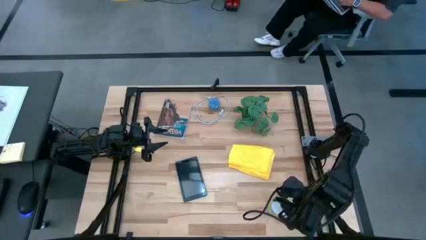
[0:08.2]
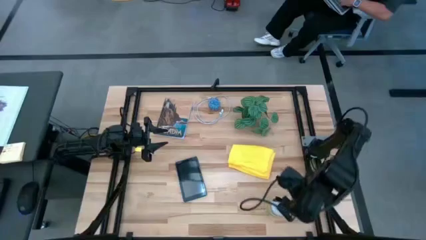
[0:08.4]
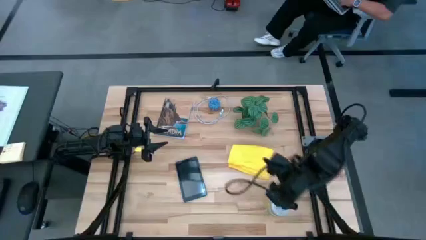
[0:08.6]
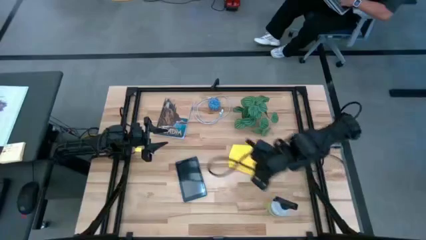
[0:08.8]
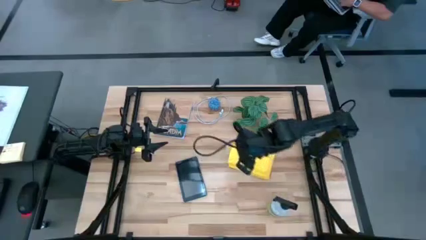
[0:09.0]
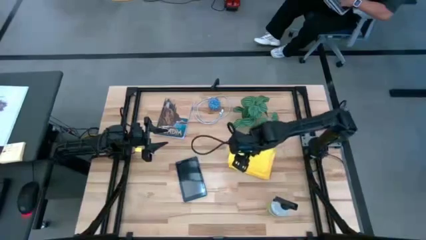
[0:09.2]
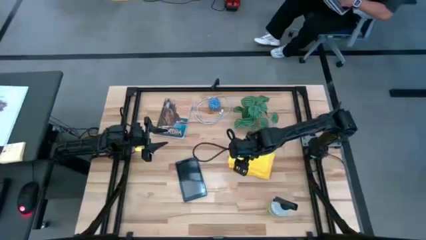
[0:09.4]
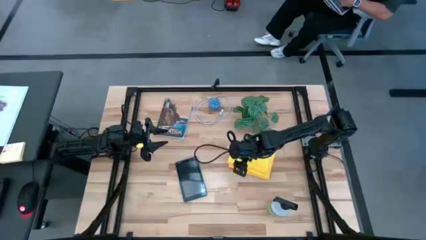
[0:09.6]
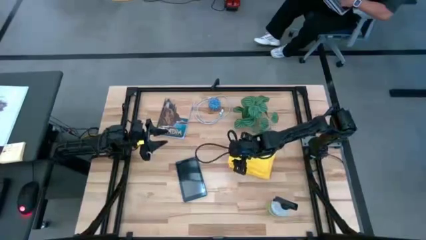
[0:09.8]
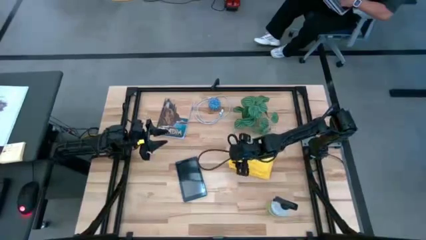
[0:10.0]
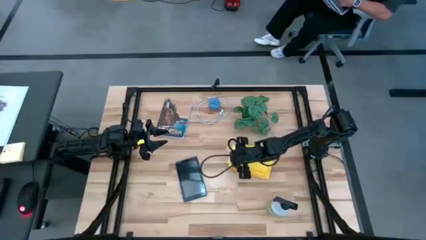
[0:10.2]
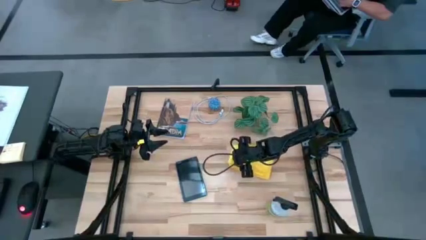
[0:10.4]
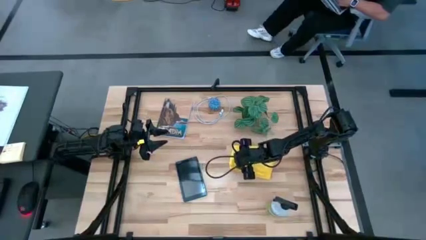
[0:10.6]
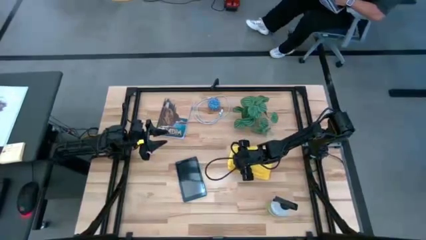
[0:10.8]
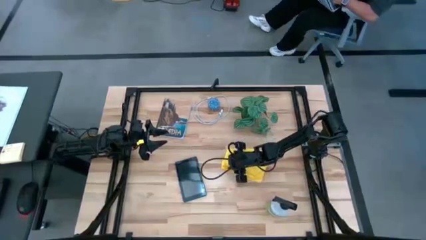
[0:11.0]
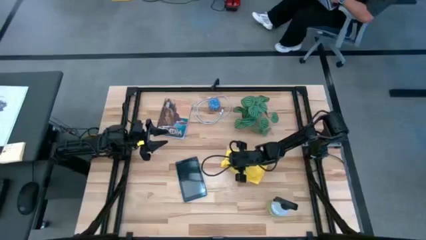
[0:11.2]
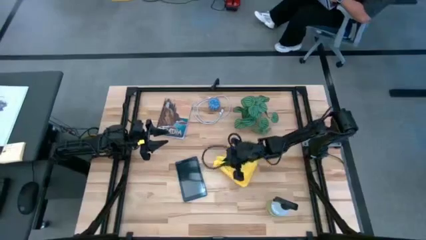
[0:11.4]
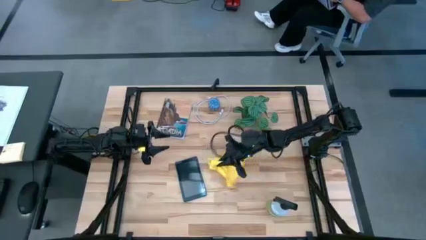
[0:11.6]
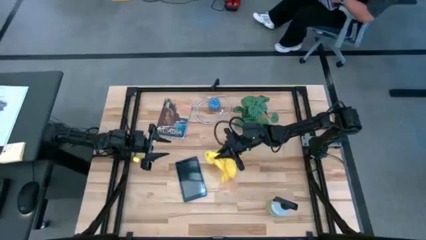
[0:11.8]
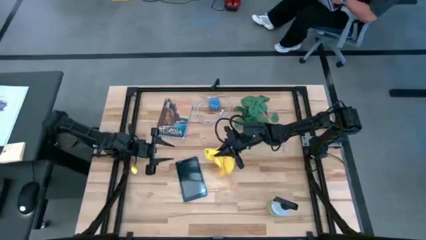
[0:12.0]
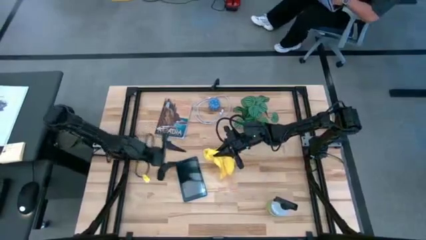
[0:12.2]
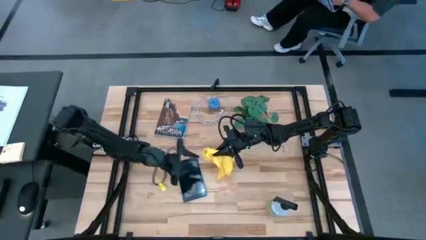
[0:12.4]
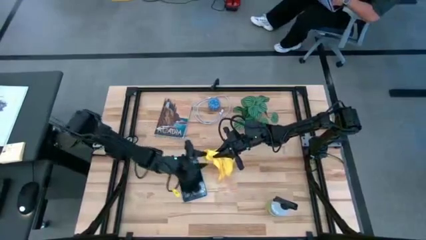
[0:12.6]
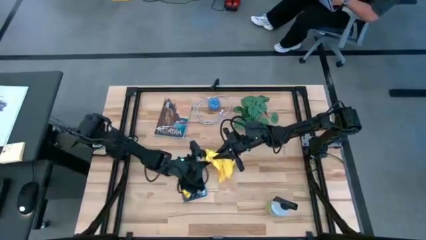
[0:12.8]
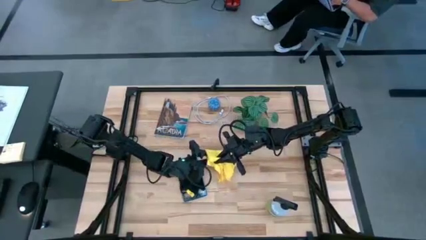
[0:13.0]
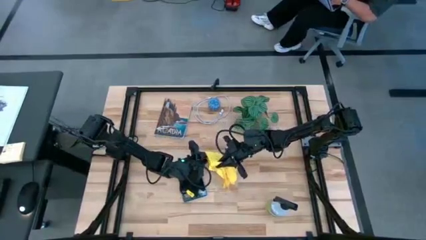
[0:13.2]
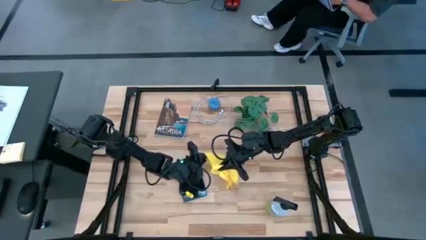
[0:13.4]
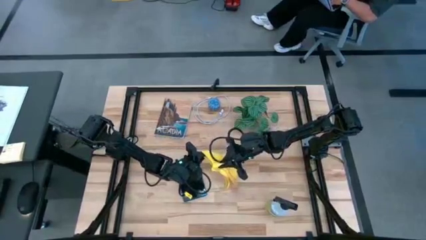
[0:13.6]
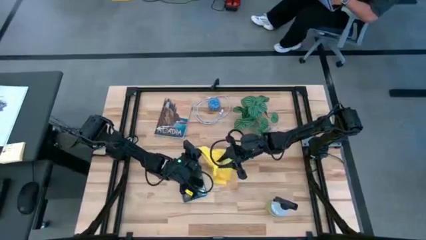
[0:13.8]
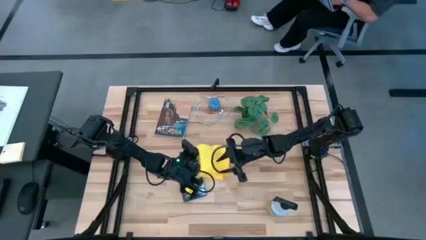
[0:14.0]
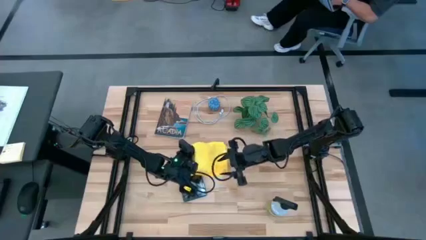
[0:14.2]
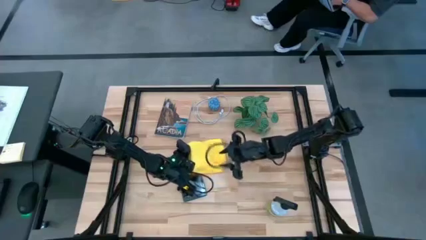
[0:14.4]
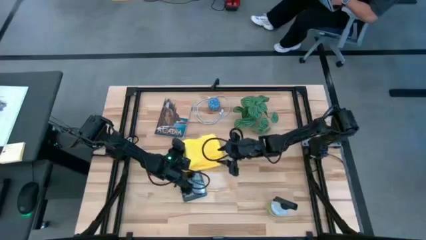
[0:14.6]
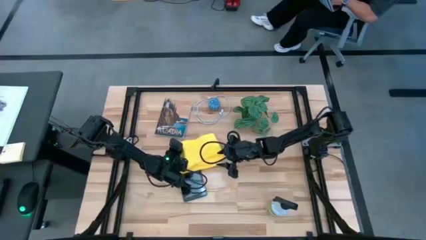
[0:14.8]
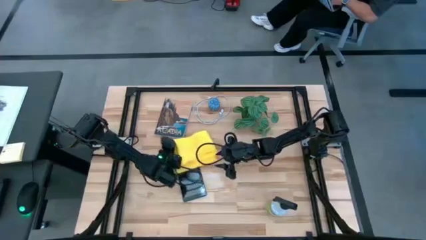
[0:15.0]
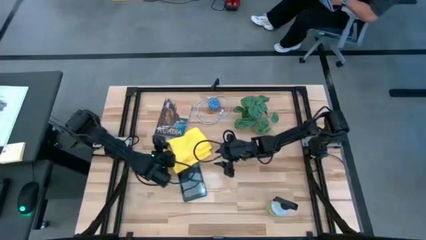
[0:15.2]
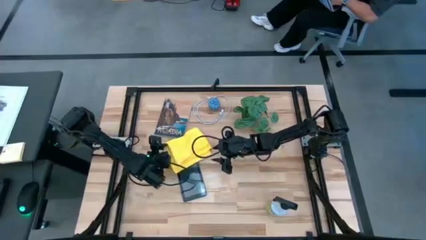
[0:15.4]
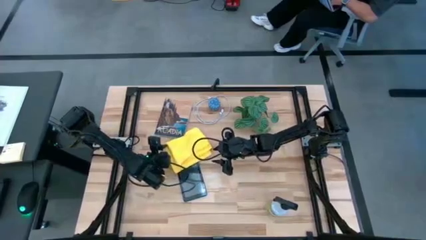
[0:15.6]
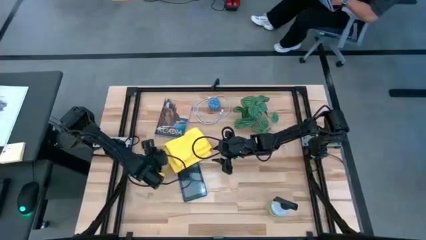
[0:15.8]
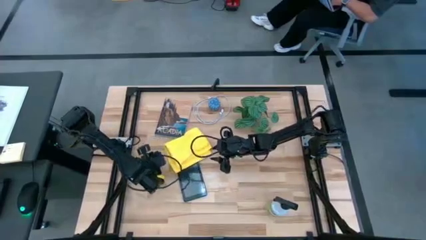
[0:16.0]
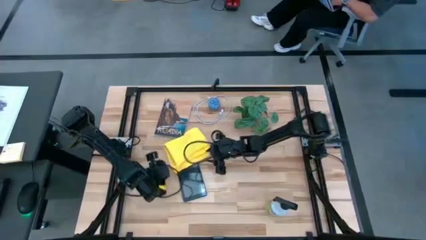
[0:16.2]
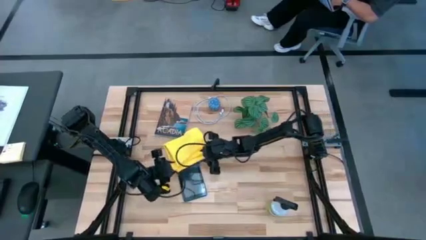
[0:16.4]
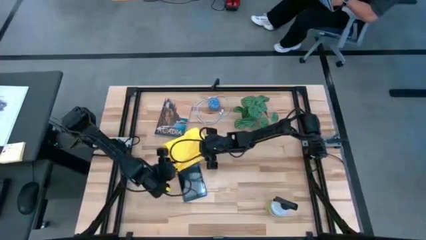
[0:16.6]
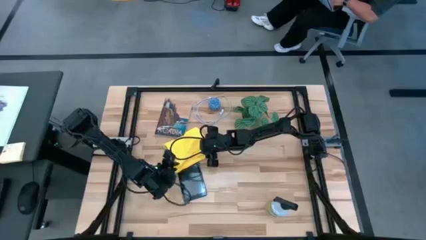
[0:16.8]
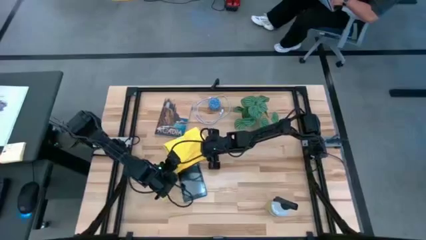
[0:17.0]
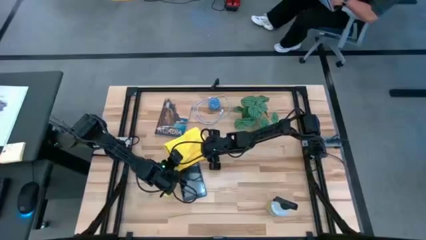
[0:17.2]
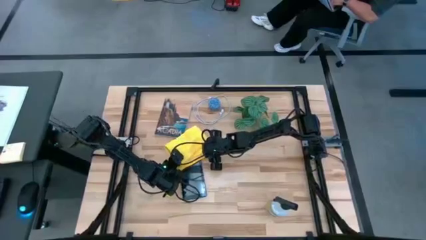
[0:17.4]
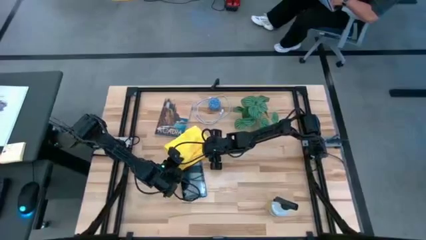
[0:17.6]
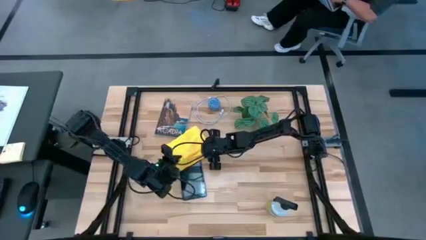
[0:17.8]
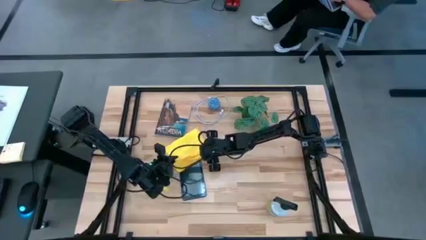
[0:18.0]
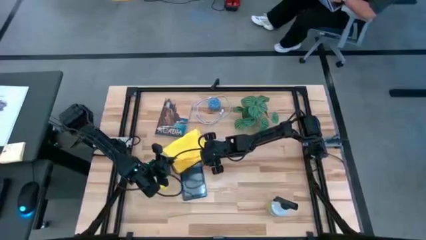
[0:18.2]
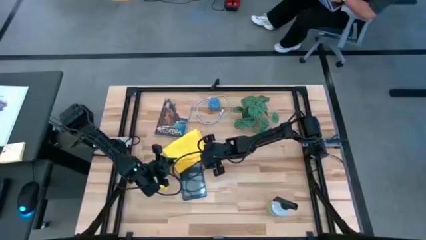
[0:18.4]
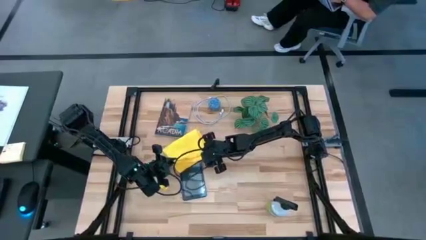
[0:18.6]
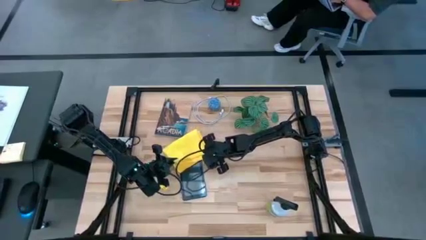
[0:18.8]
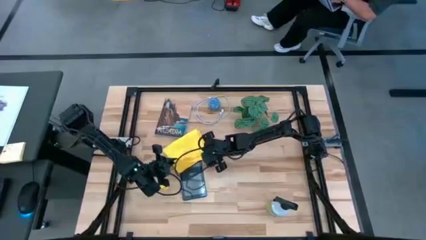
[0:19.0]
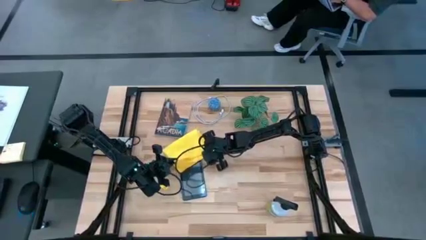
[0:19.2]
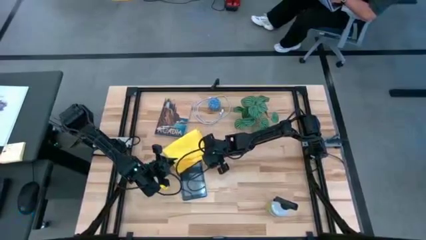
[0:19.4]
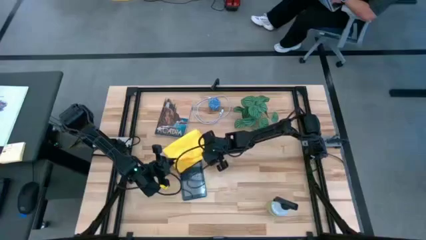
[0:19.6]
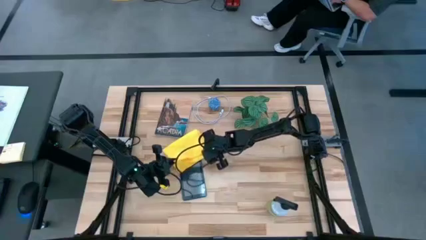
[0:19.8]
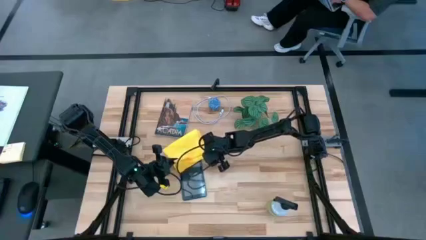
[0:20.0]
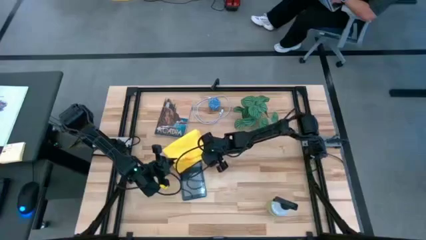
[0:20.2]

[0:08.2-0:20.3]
Task: Clean tablet
Prepare the microfiber towel to clean the tablet
